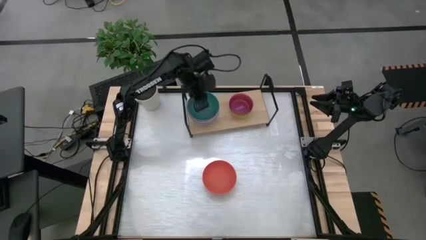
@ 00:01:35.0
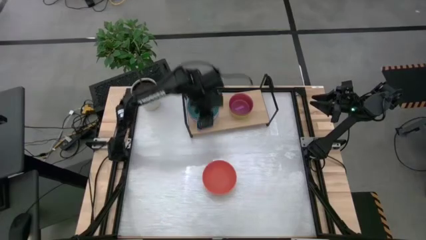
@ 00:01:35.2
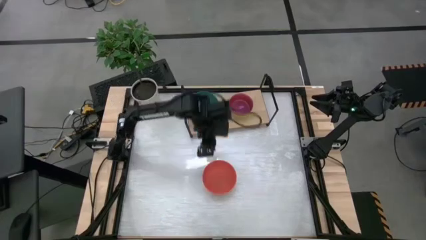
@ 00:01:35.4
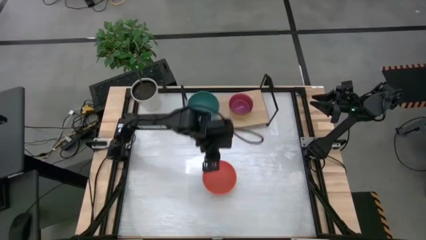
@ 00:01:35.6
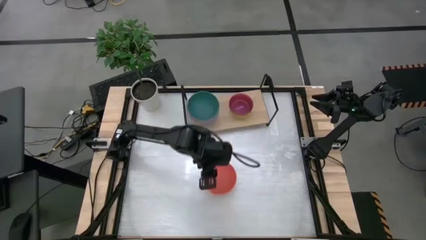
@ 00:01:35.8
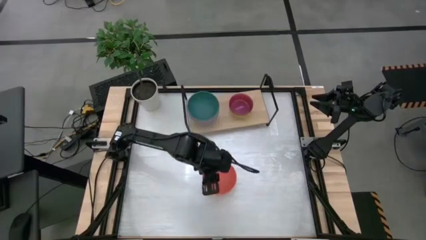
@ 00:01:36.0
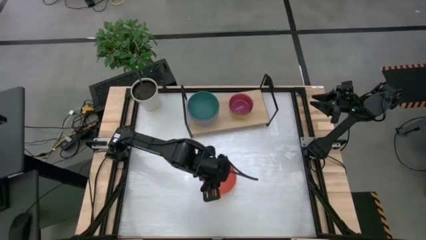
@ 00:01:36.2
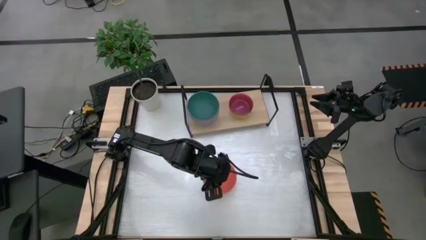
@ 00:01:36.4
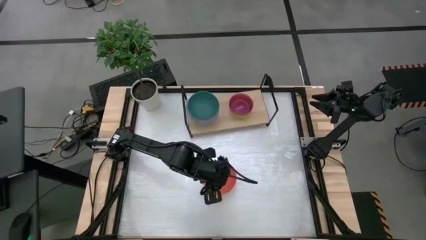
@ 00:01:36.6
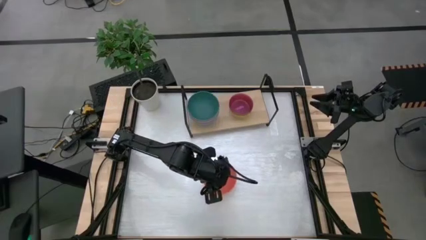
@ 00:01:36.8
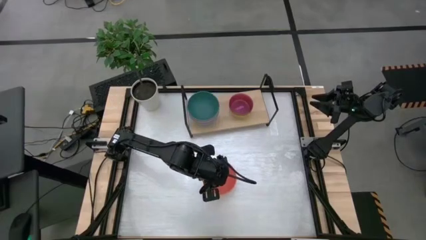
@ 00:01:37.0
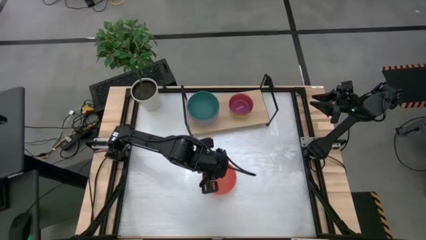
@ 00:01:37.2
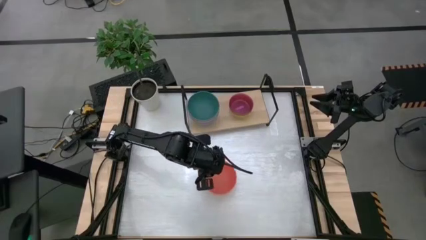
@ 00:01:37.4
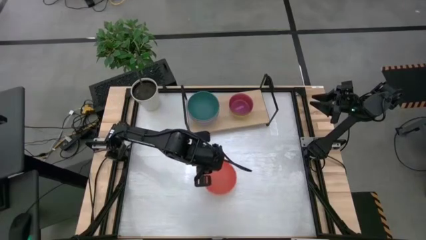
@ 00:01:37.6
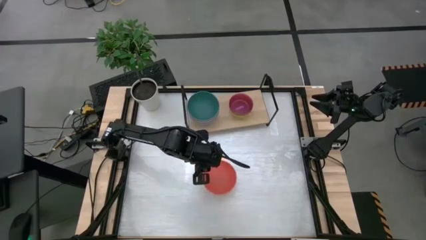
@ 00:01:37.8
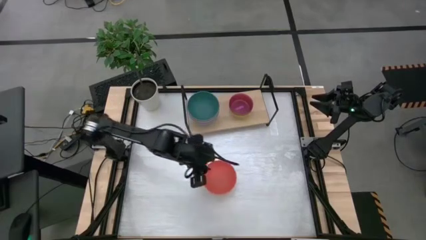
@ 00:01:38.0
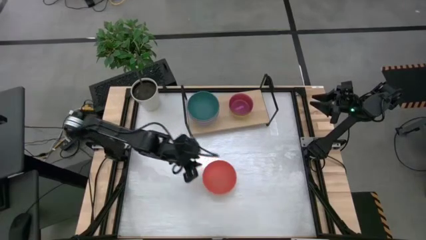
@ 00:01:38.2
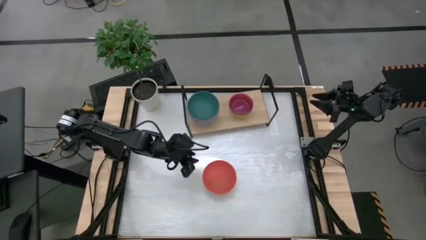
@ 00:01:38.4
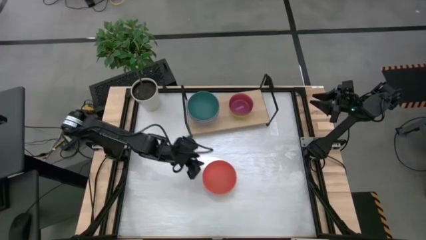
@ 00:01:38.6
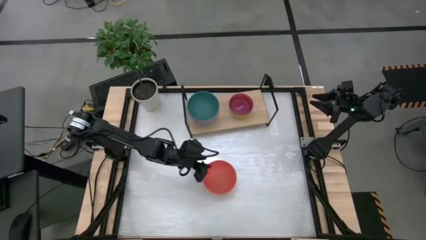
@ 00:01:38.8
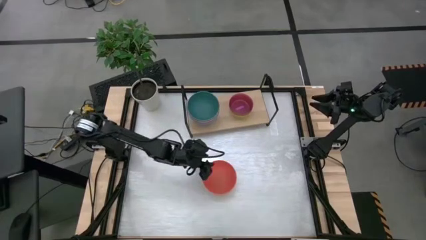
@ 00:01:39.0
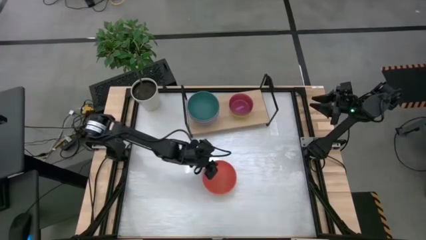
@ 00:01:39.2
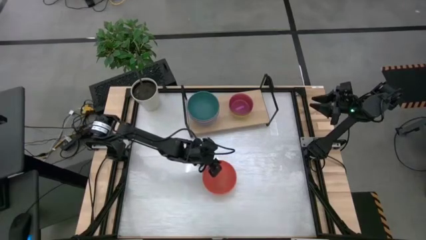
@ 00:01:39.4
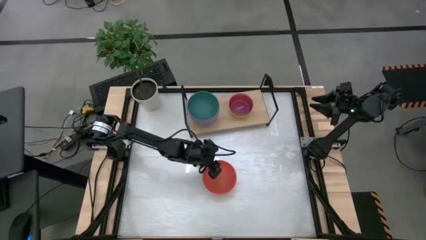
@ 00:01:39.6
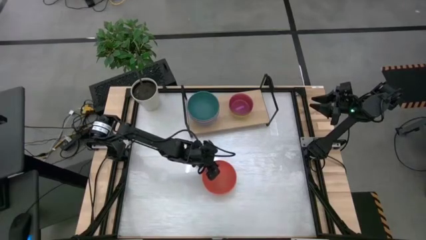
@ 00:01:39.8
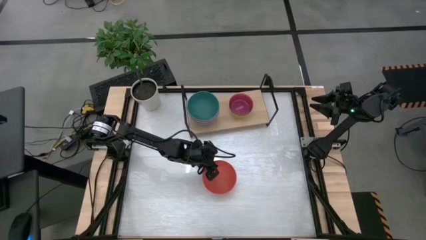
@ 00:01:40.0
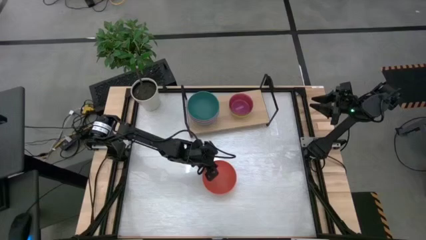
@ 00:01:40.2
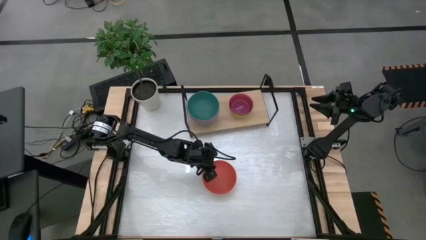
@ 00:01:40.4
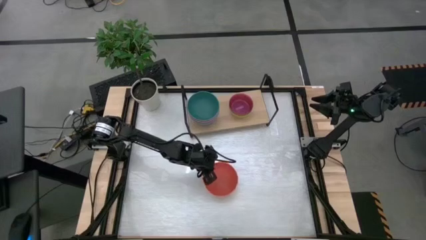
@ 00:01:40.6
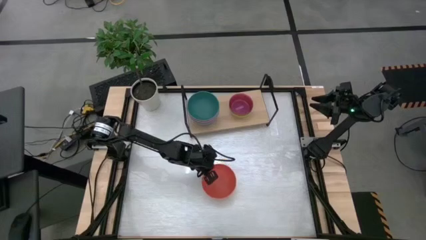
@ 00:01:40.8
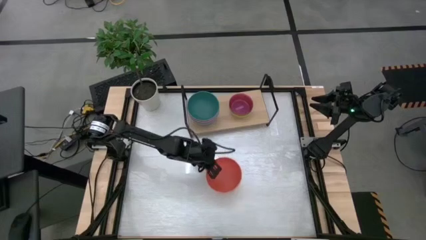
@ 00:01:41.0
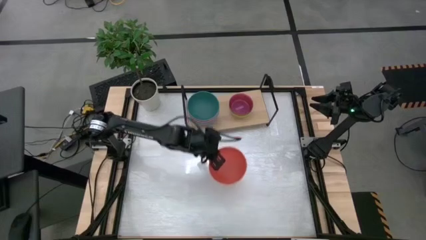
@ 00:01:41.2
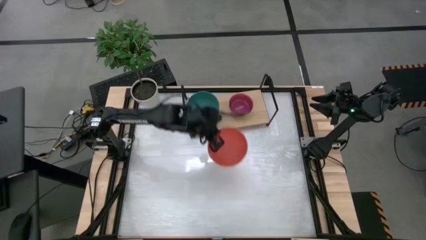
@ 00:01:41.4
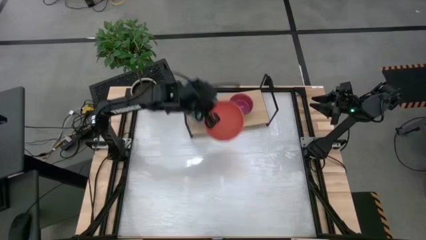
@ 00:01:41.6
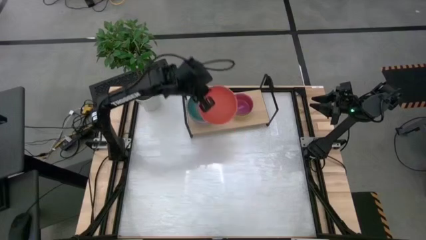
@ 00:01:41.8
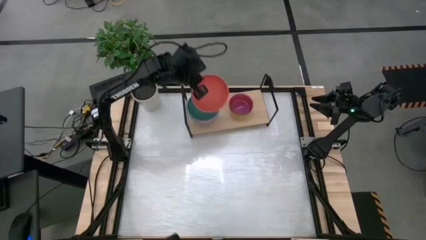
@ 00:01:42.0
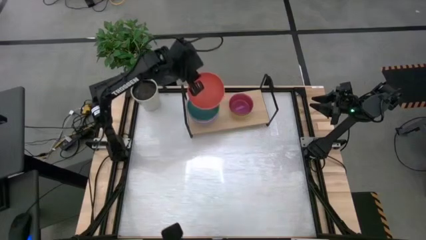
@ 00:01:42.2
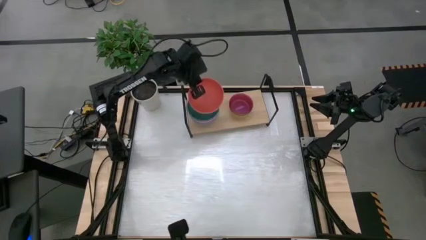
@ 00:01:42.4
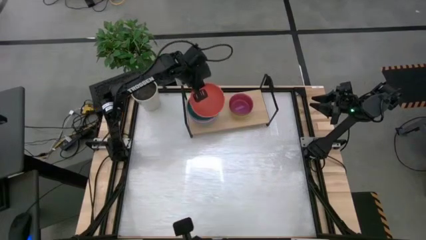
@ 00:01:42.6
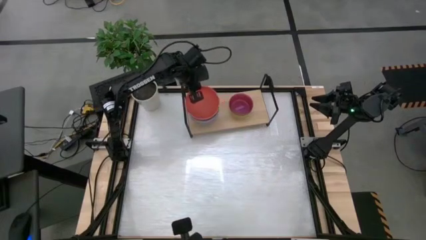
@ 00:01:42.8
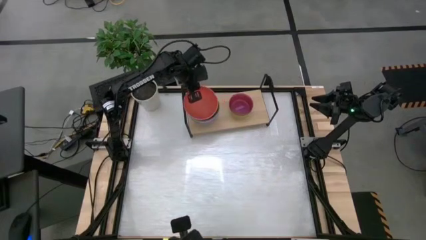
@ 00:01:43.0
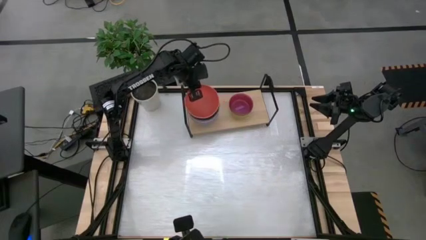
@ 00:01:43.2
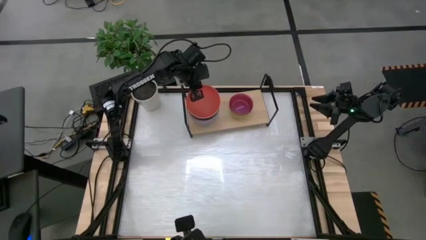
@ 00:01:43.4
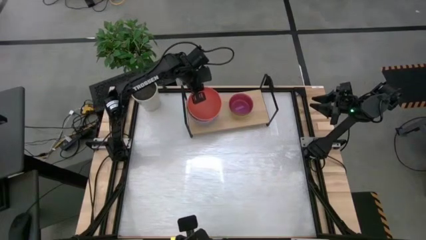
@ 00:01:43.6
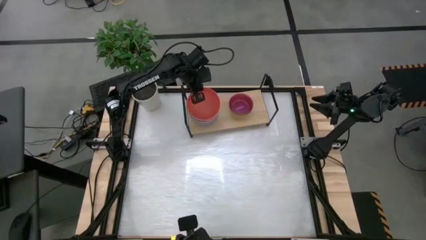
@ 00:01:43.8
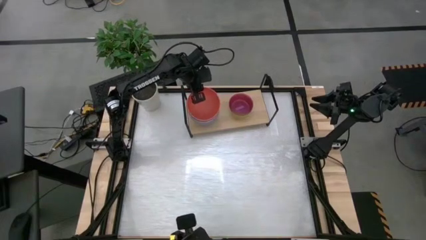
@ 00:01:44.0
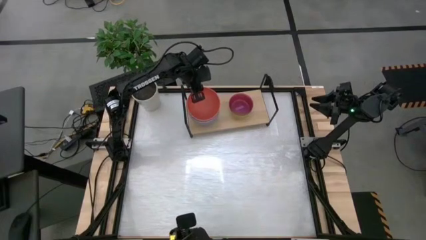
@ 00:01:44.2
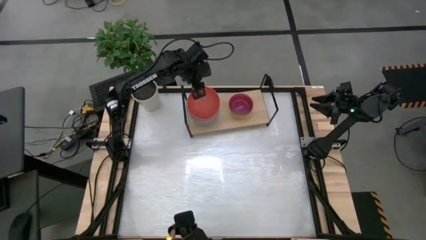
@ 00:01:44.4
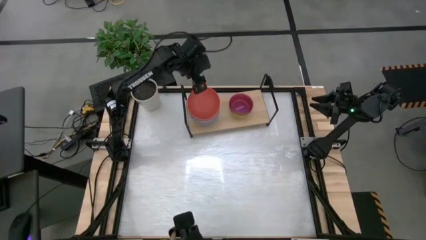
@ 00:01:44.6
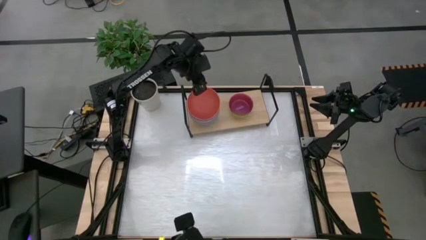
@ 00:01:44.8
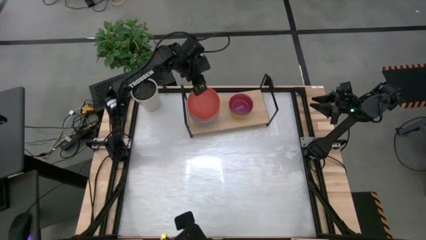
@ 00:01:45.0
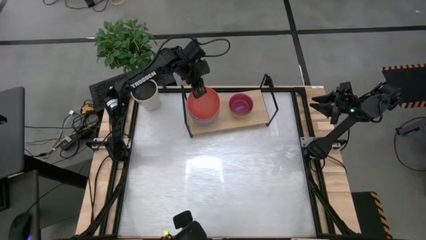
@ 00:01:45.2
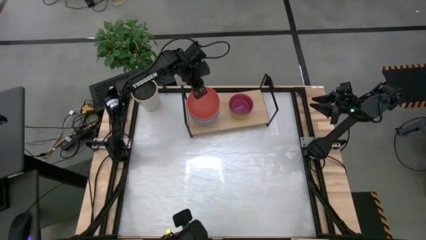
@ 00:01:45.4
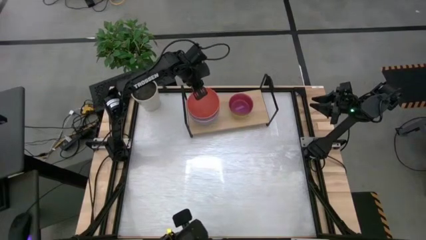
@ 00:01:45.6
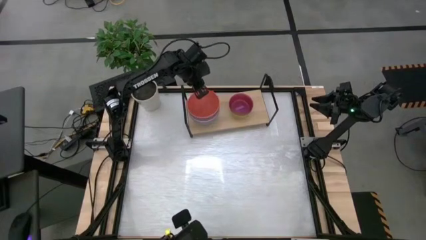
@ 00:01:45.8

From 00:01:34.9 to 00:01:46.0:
Task: Place and stack bowls onto a shelf
Stack the big orange bowl on top of the big green bowl on the shelf
